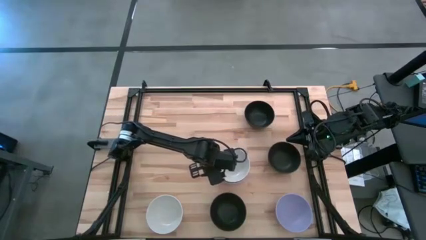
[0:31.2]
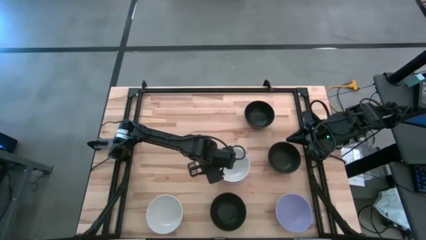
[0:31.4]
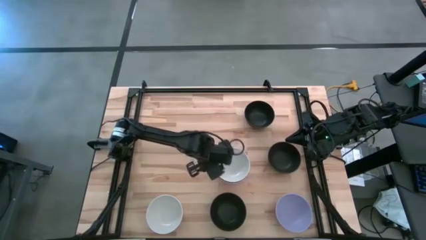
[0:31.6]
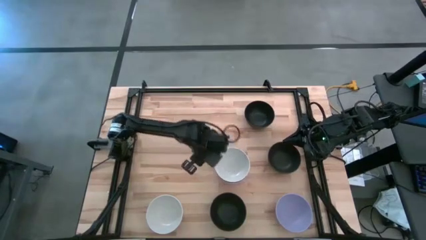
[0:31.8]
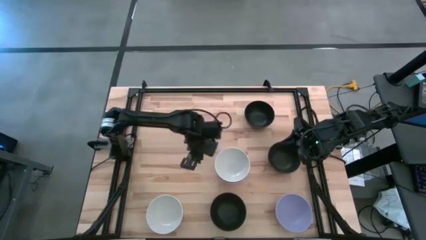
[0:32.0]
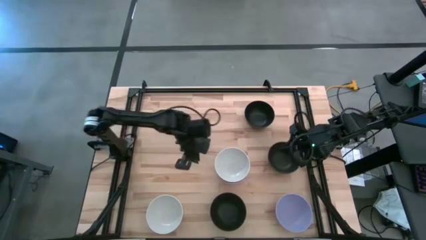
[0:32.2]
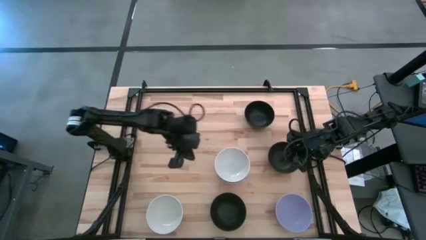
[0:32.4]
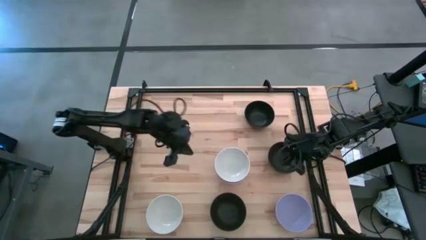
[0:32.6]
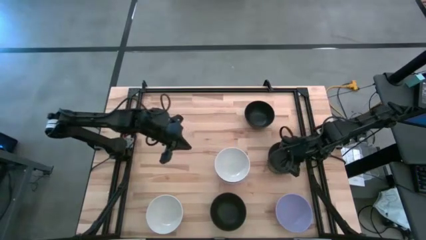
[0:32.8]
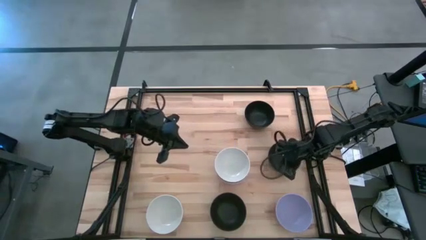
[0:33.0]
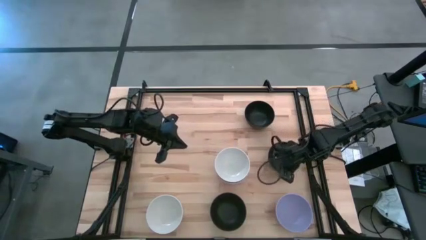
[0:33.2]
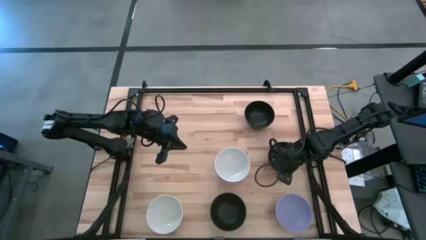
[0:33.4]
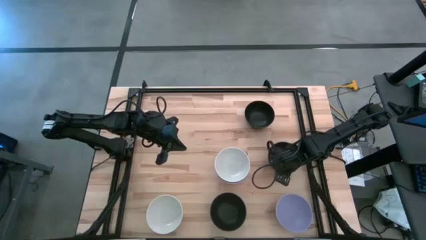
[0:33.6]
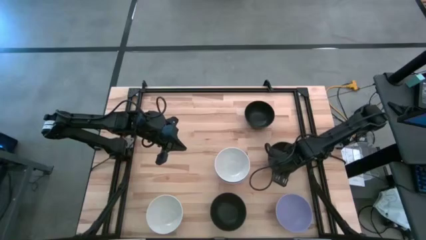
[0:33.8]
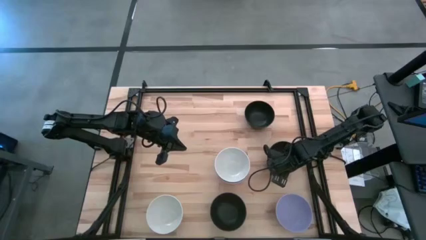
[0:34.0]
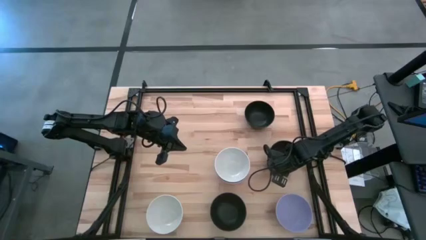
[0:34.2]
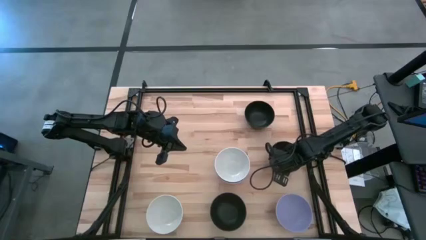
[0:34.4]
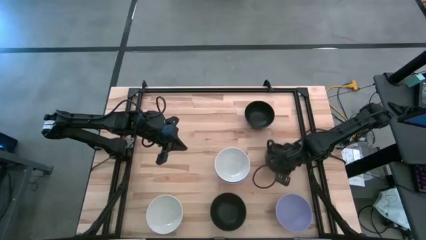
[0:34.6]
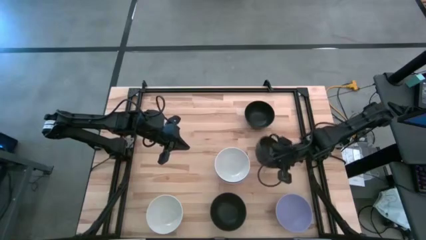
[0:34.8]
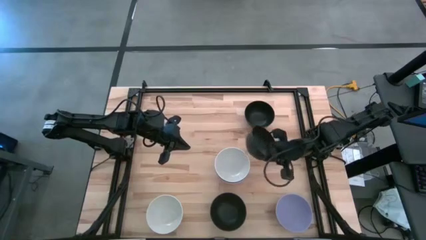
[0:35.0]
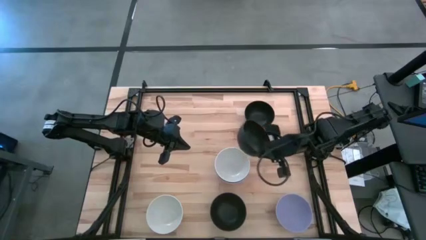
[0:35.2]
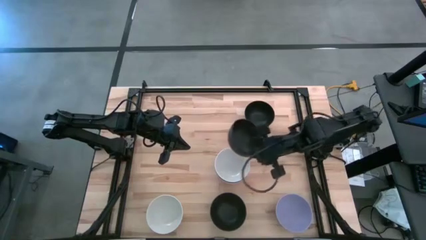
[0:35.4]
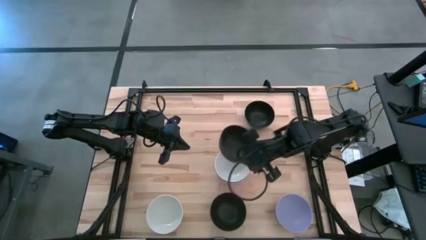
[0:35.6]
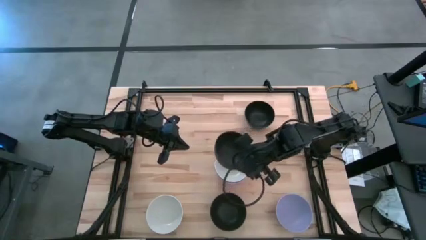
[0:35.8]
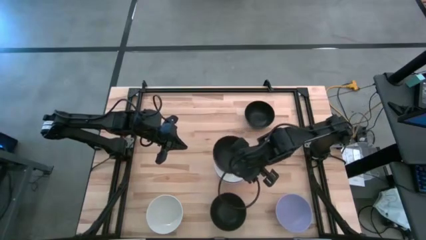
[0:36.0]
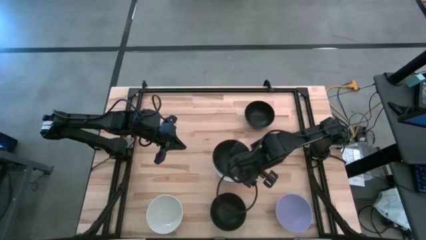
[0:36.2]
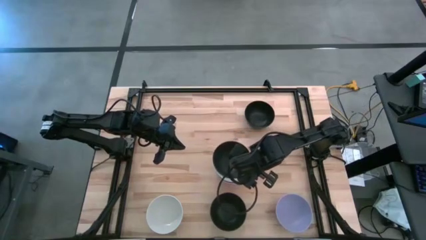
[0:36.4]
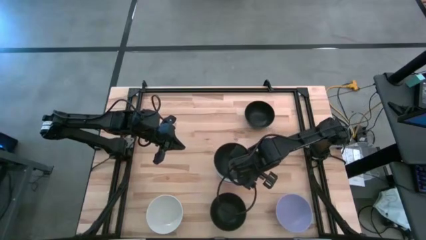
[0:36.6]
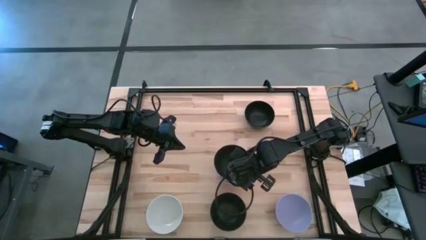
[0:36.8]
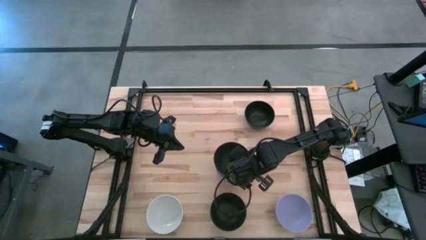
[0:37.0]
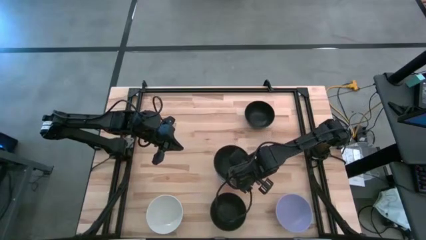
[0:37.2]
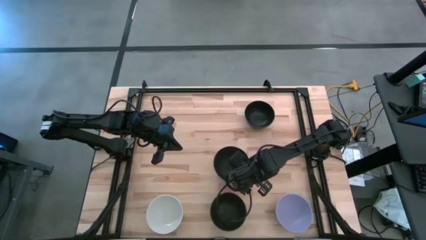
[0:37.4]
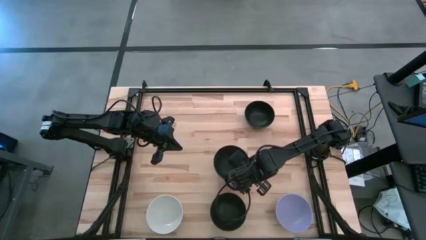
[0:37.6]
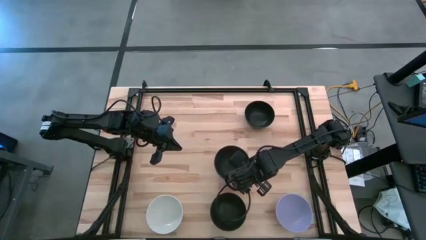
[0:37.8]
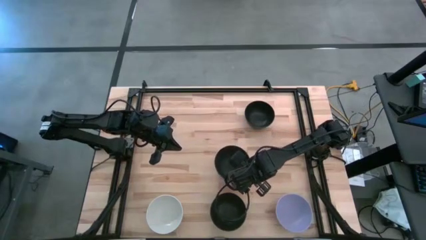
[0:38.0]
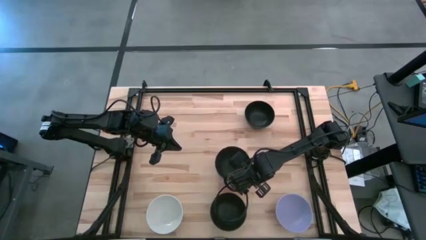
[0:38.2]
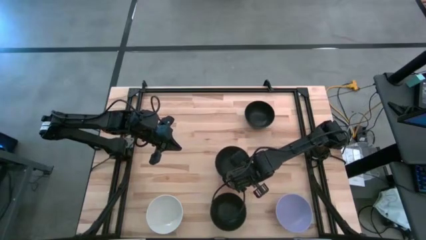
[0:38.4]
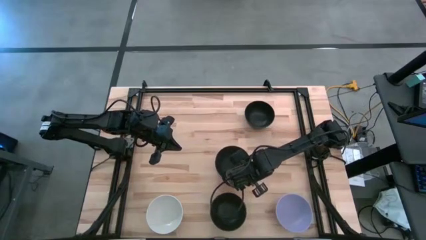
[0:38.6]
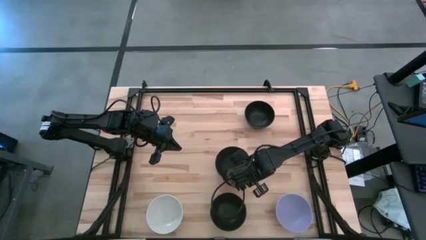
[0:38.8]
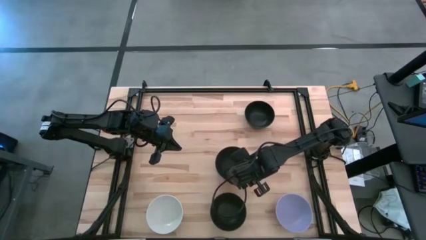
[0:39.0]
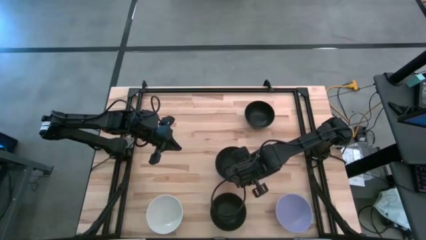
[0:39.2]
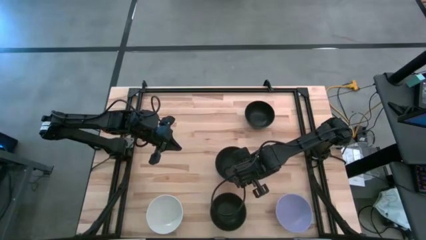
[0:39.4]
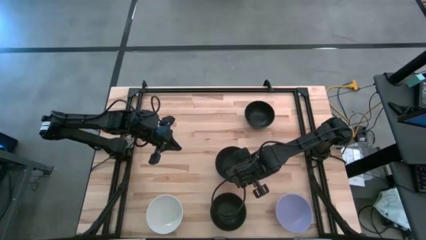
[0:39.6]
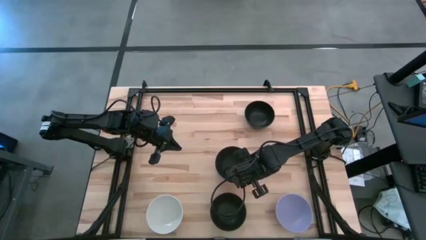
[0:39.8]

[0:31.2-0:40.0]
Task: Nest bowls inside each other
Stack the black bowl on top of the white bowl

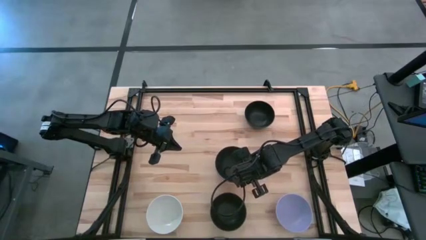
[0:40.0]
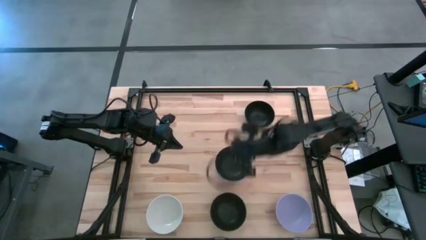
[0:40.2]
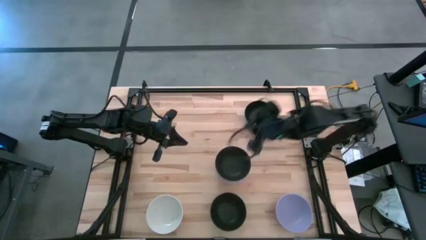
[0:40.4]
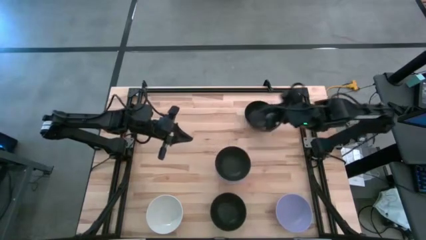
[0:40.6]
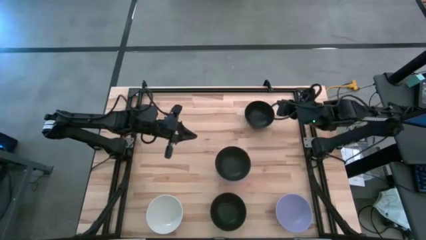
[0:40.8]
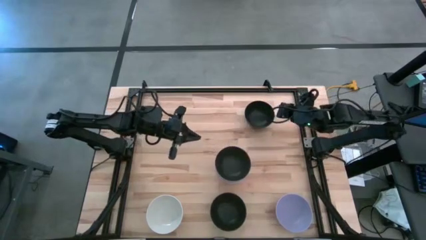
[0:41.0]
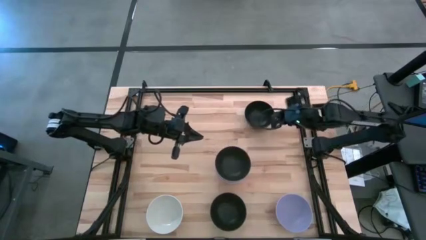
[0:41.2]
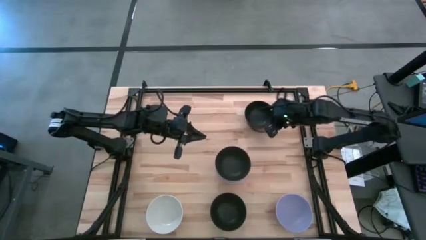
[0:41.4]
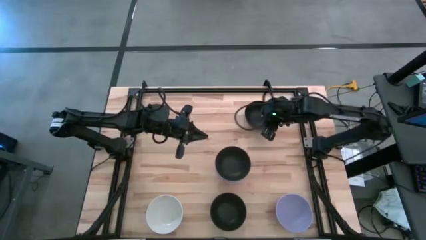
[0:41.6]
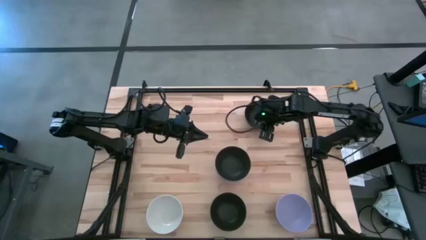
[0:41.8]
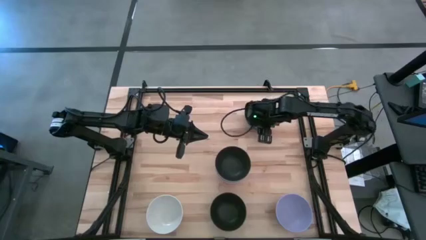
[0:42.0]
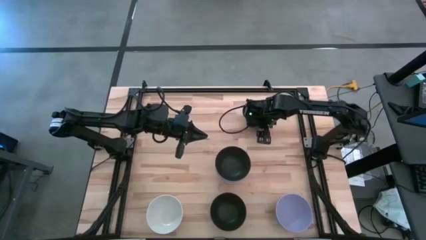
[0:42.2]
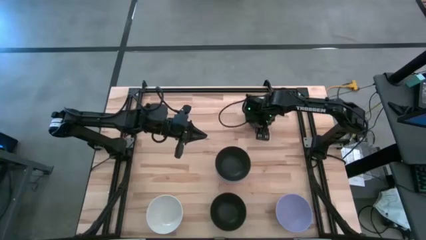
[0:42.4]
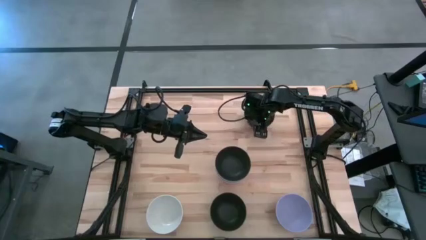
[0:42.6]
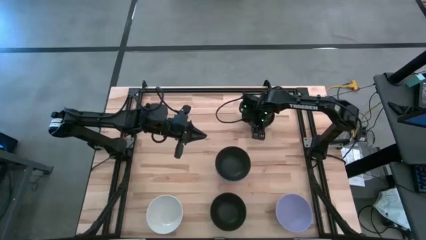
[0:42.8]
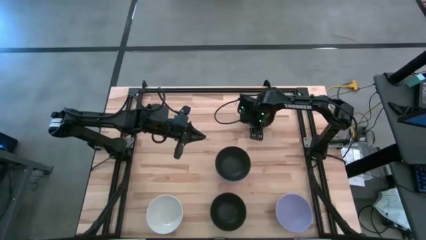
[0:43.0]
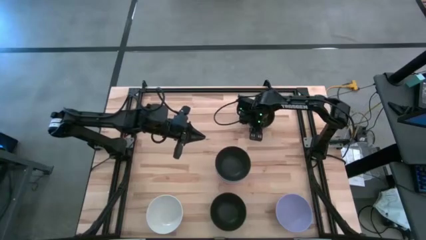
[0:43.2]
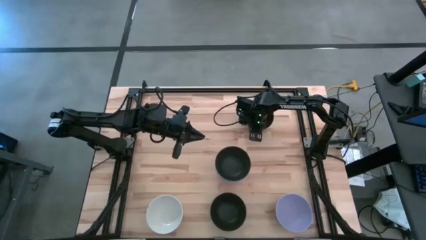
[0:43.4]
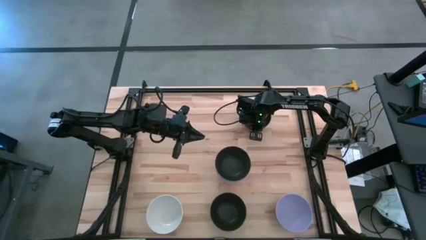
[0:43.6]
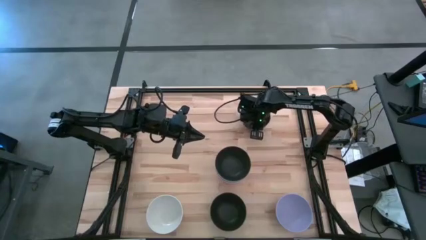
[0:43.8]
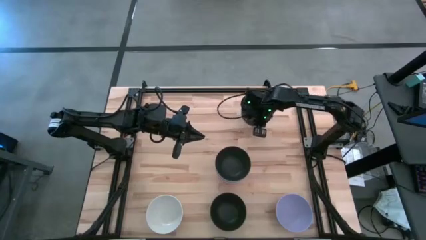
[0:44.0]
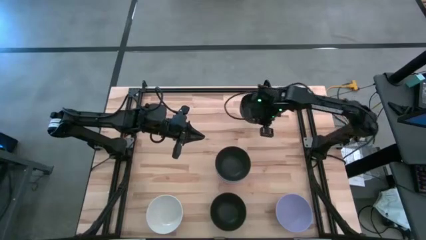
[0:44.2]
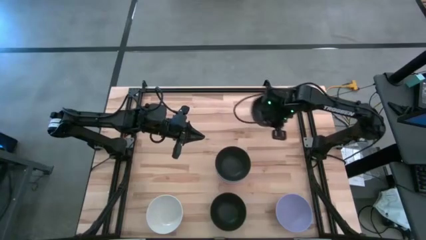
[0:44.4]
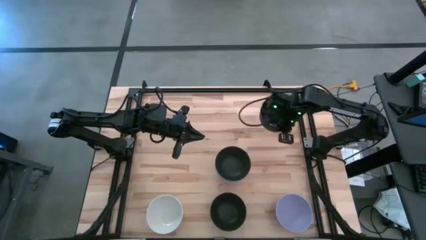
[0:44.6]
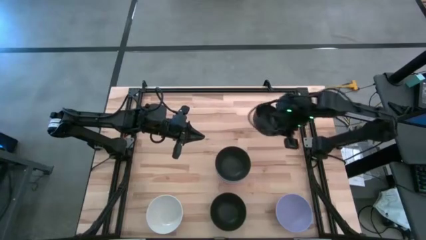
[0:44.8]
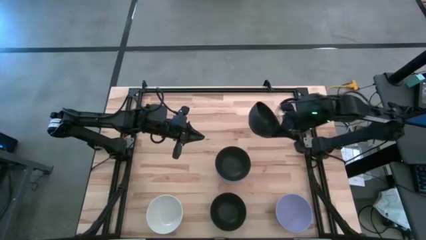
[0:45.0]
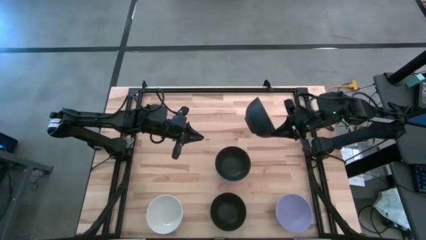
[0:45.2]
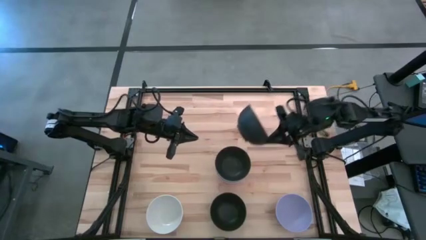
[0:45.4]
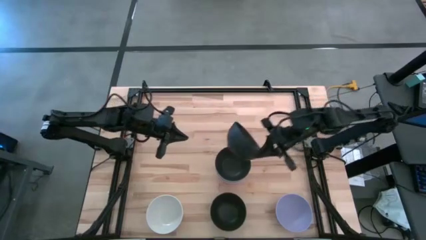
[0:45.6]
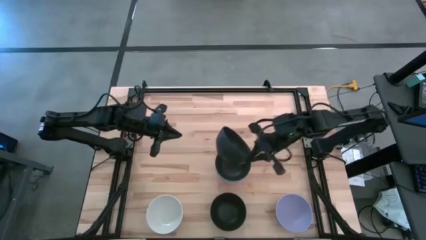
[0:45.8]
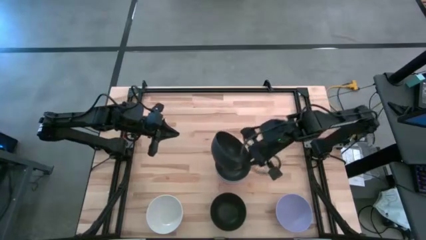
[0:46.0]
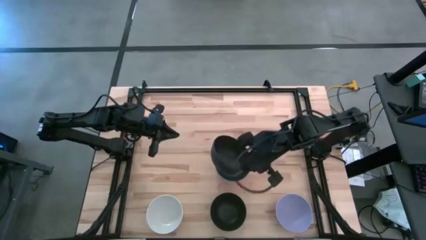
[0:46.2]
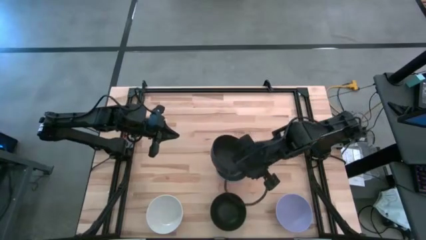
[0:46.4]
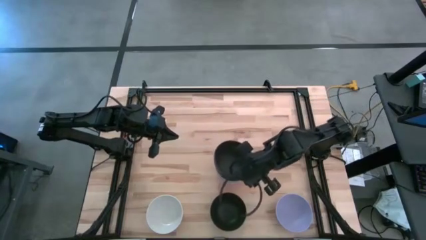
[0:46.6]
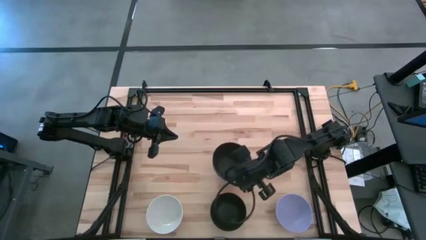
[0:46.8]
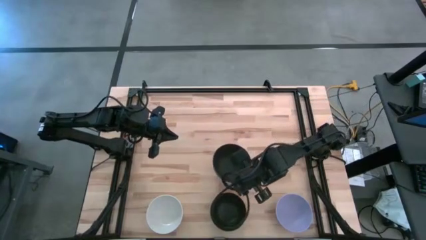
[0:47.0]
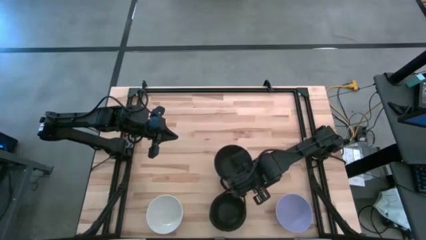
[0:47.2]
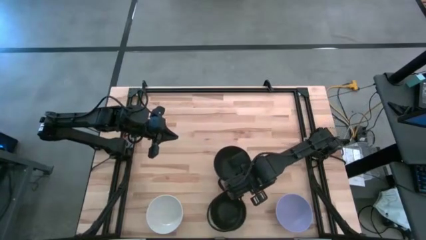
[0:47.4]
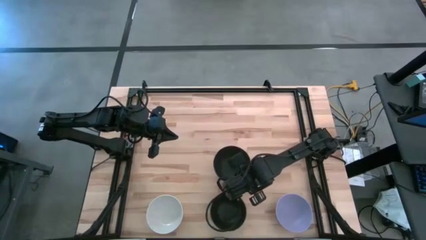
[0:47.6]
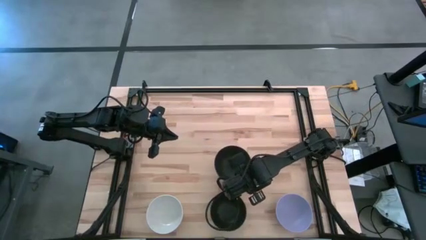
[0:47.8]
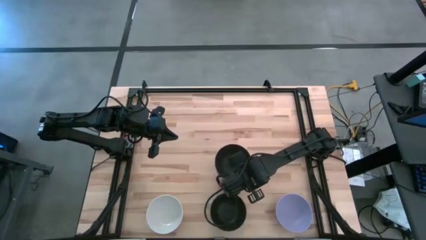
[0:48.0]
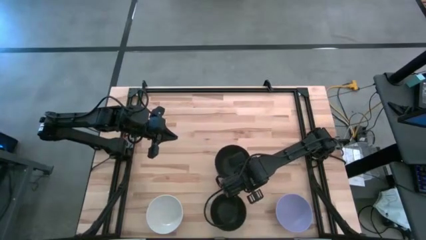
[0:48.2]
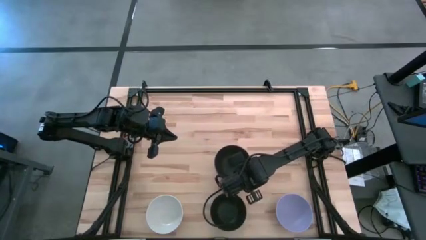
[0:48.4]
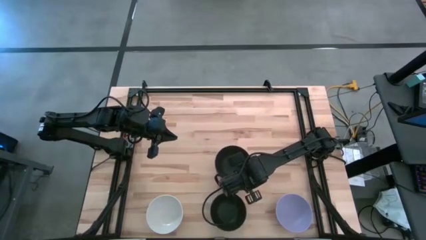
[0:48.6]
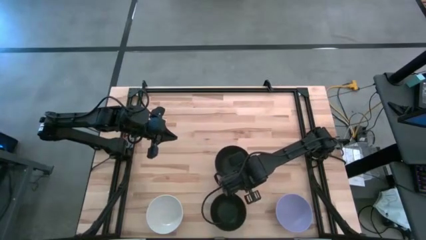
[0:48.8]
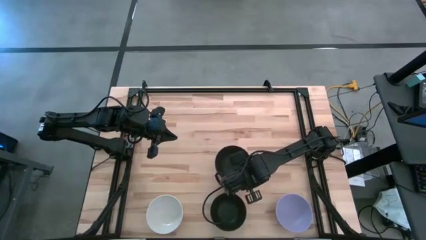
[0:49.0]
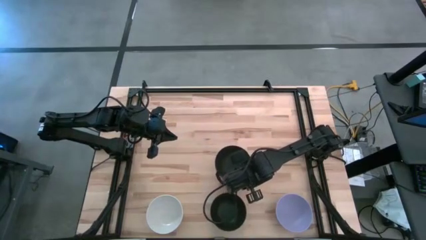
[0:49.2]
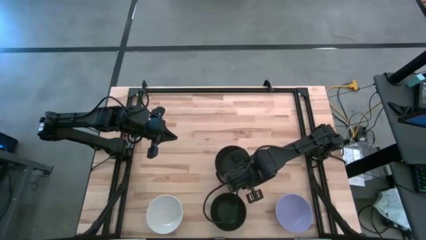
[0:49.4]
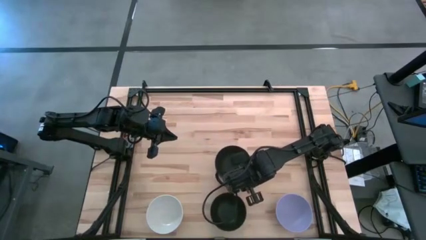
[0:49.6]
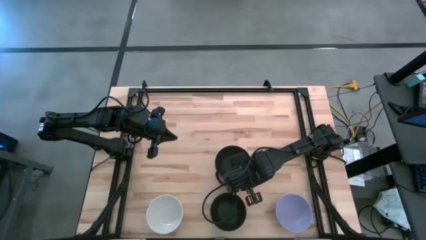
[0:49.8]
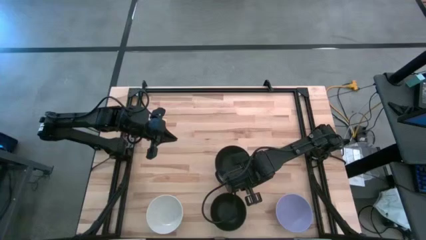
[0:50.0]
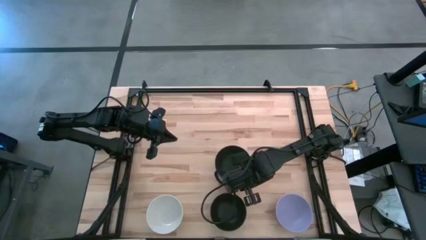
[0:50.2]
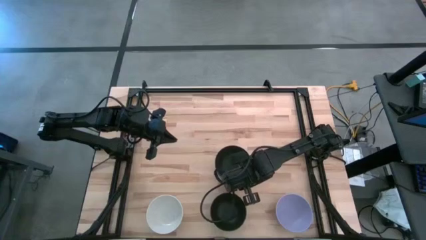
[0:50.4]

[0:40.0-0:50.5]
Stack the black bowl on top of the black bowl
